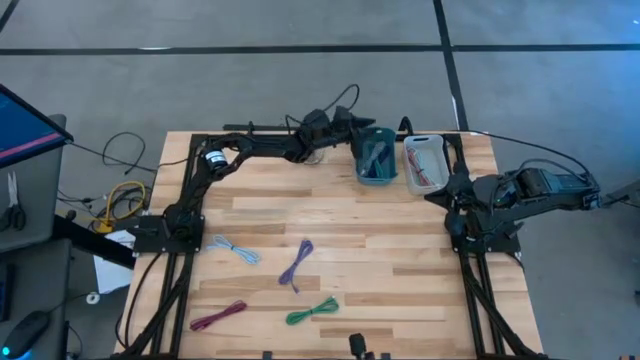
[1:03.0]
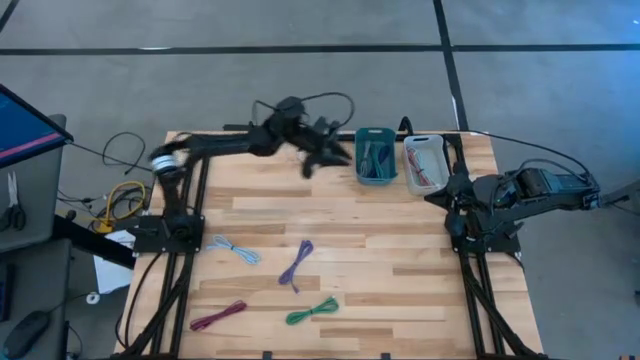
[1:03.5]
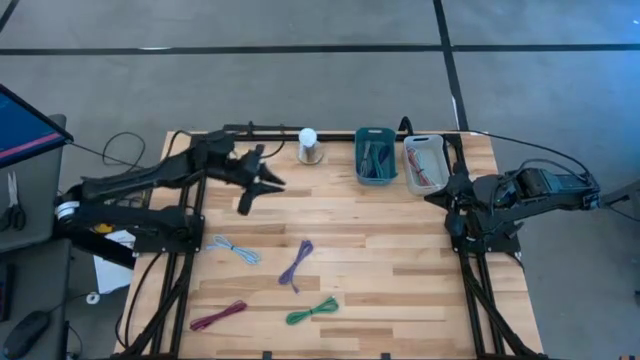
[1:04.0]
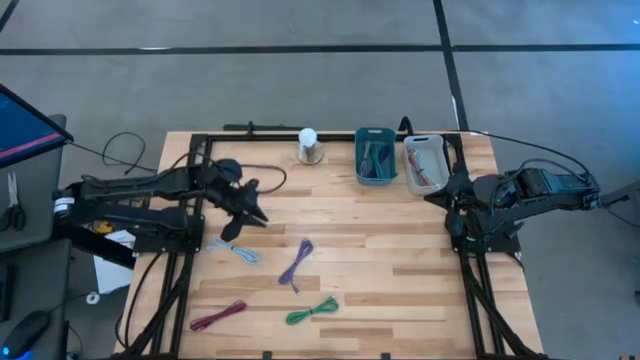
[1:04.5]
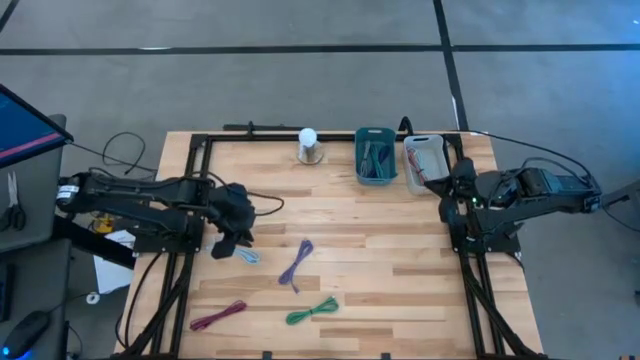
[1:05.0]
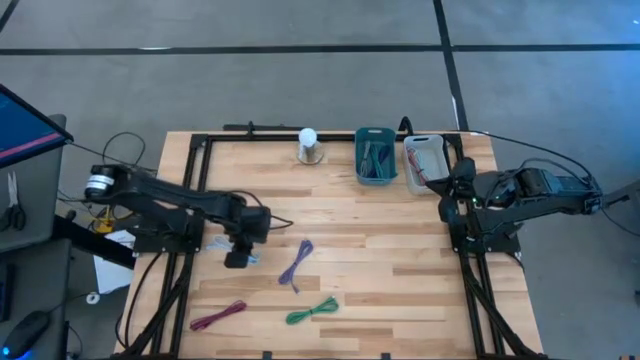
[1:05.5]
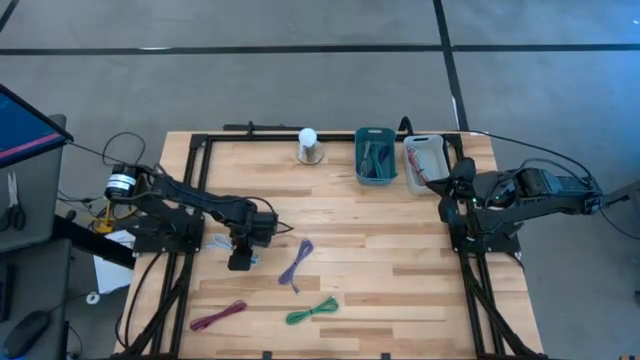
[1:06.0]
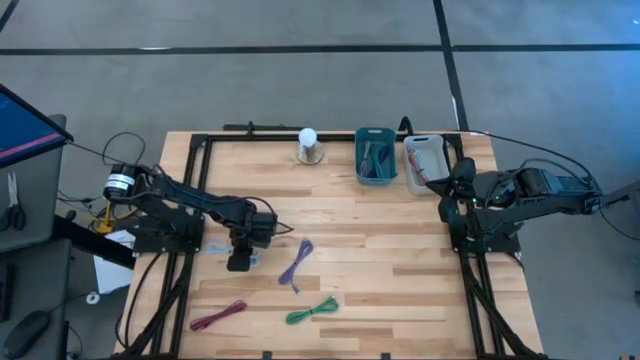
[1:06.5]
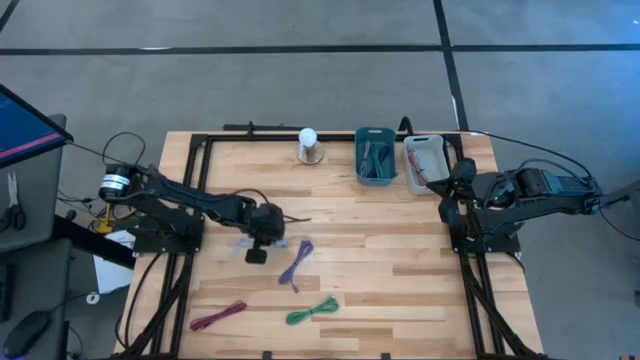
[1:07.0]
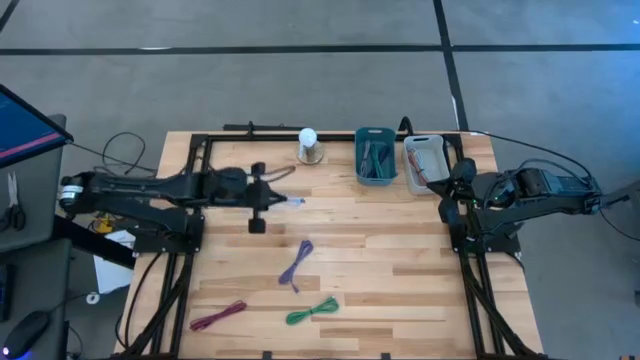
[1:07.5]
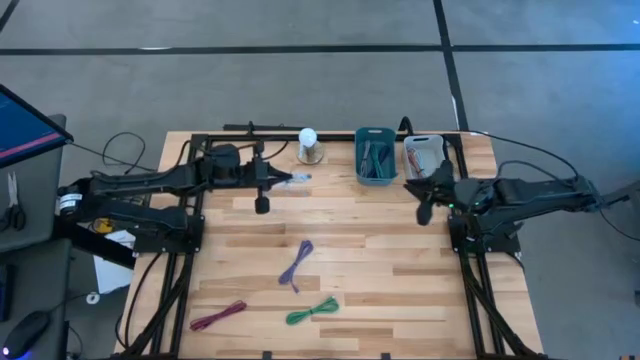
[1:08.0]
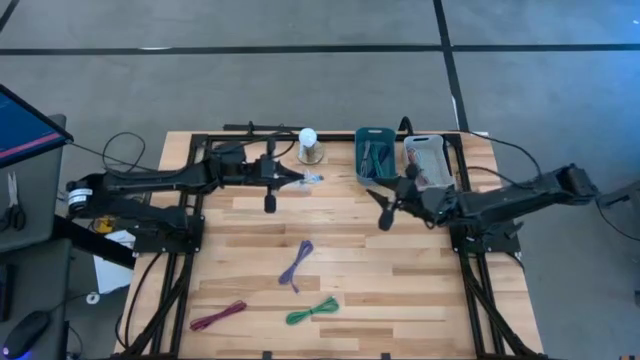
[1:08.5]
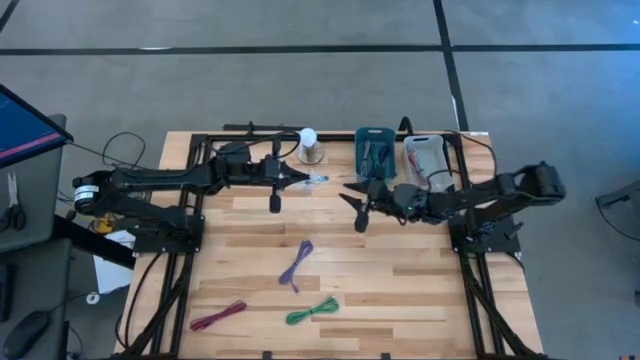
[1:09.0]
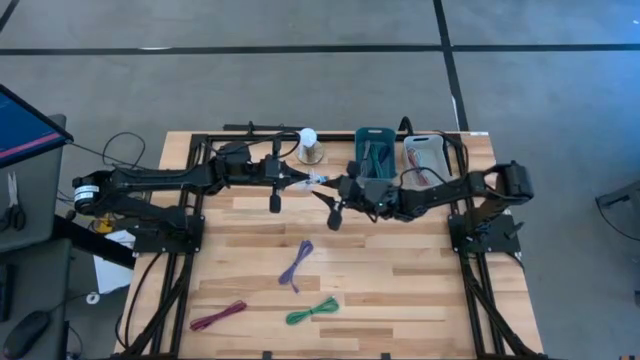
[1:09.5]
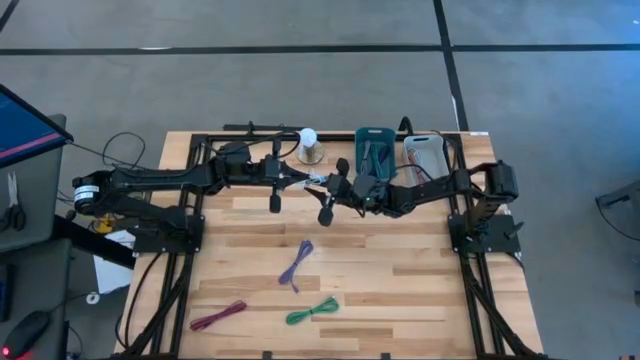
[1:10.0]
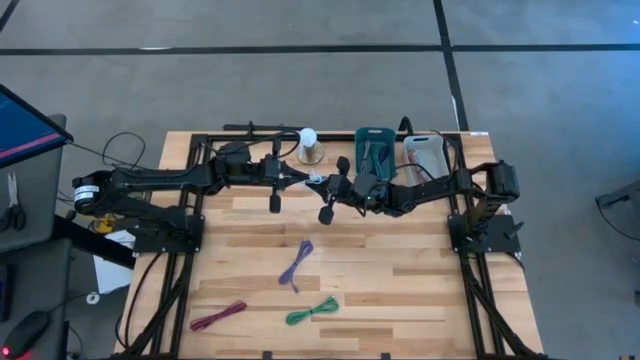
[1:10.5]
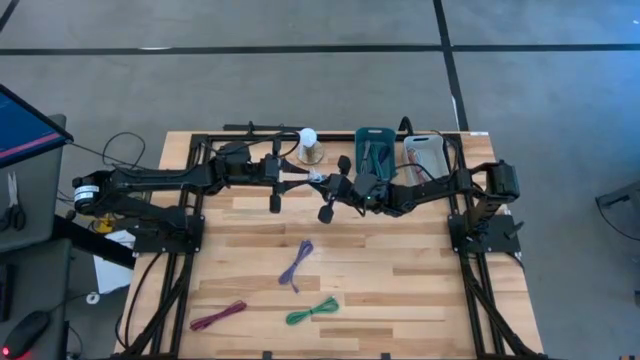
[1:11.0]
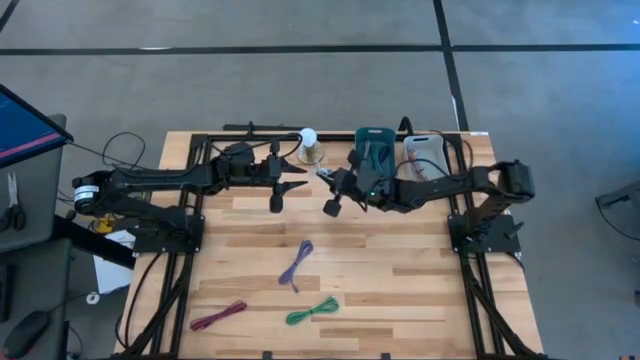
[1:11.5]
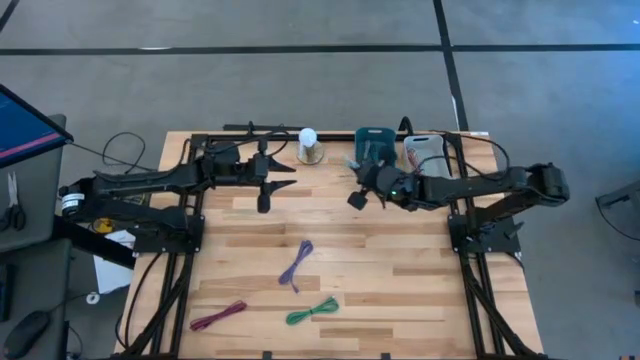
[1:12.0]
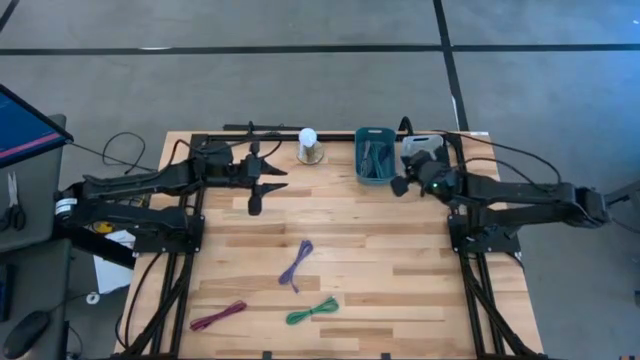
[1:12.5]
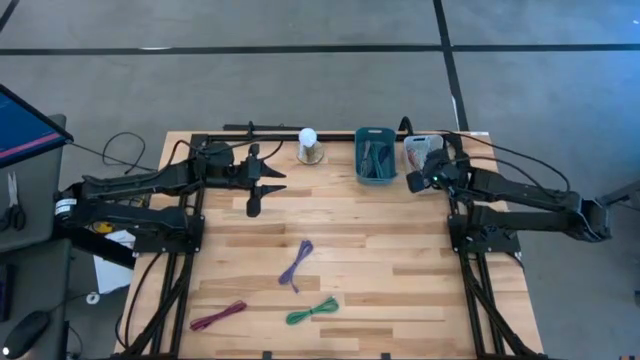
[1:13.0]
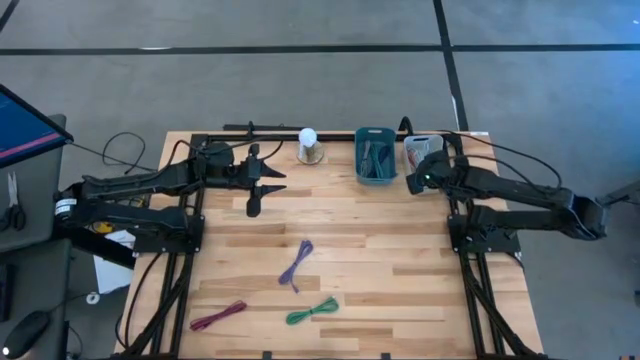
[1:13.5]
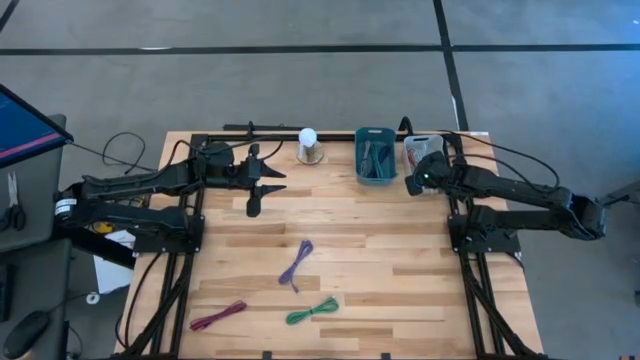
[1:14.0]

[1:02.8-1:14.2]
Task: Pick & Place USB Port
Put the blue charger cable into the gray bin

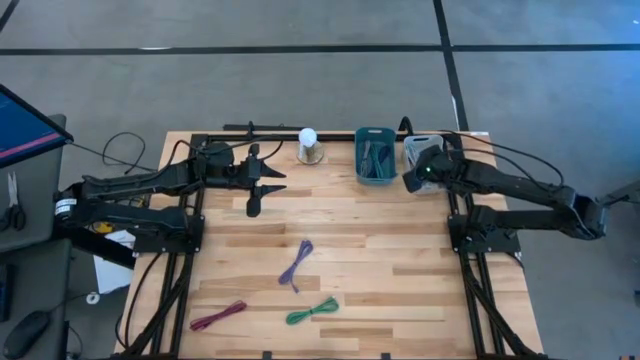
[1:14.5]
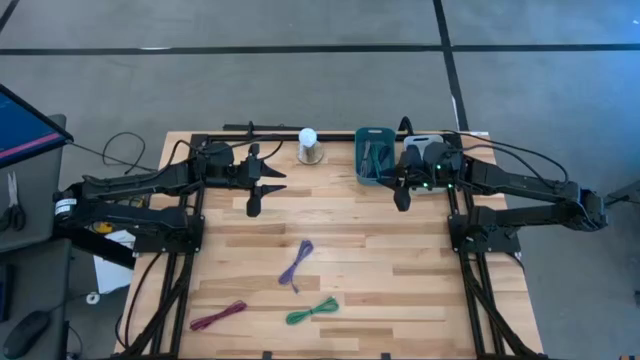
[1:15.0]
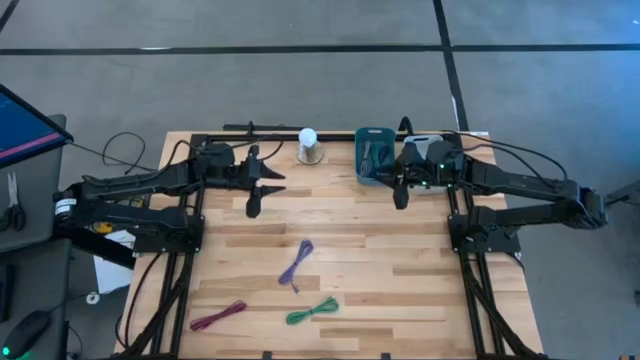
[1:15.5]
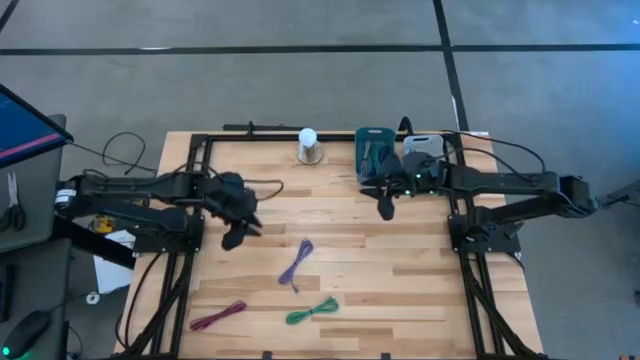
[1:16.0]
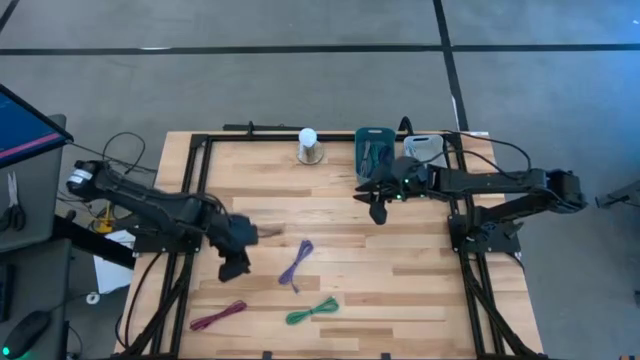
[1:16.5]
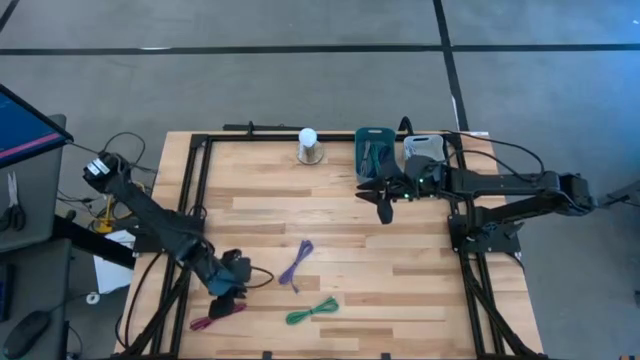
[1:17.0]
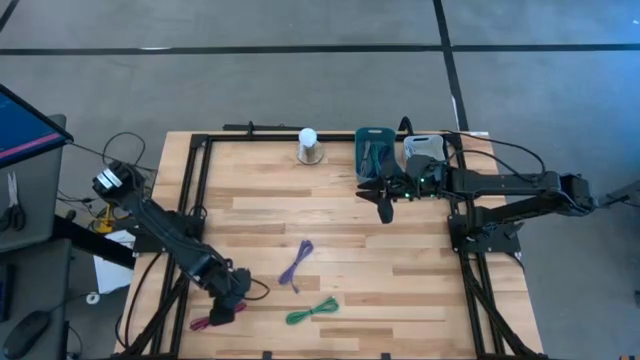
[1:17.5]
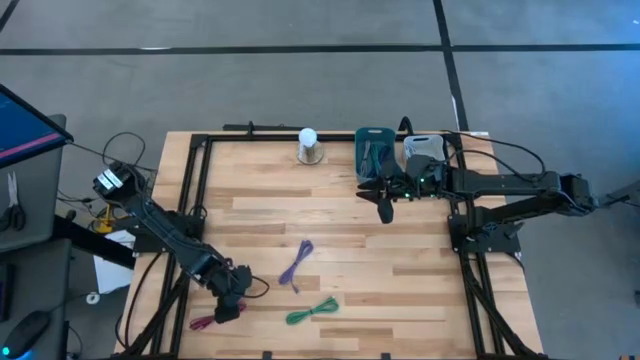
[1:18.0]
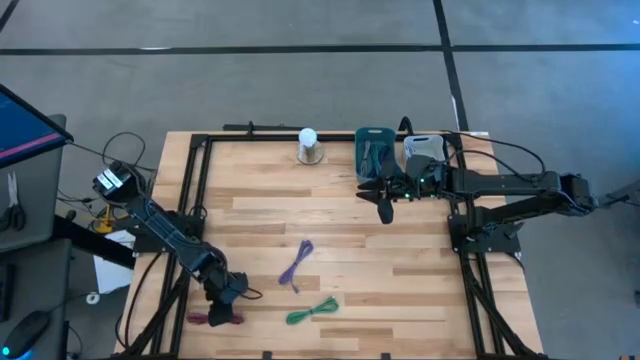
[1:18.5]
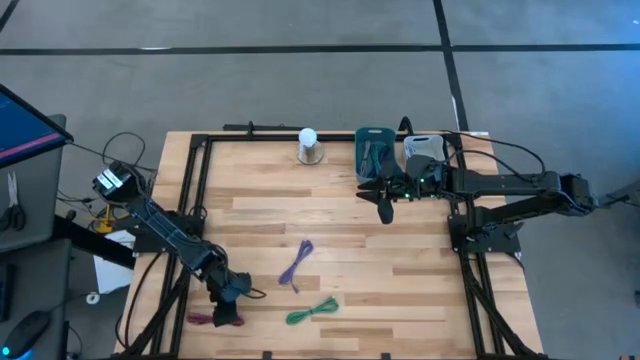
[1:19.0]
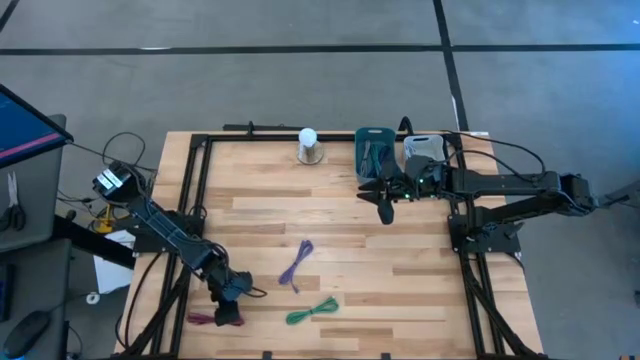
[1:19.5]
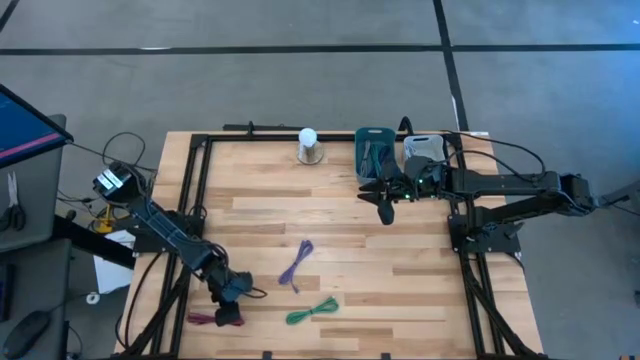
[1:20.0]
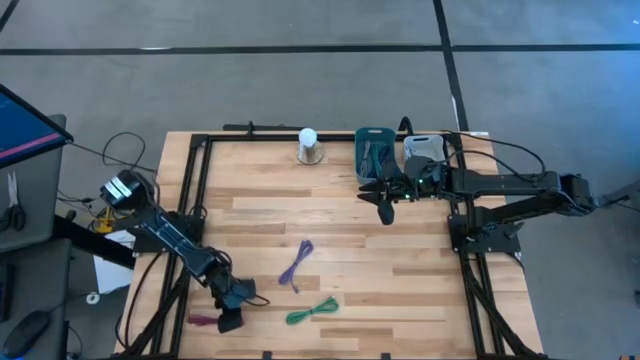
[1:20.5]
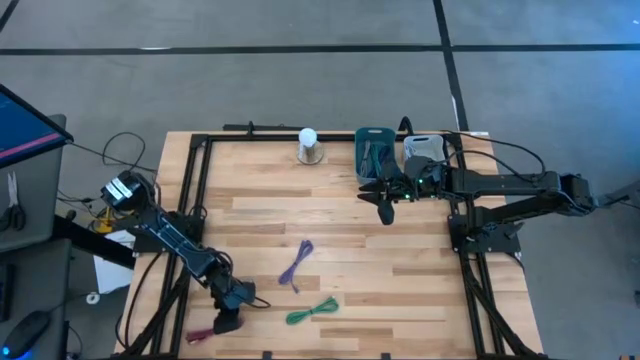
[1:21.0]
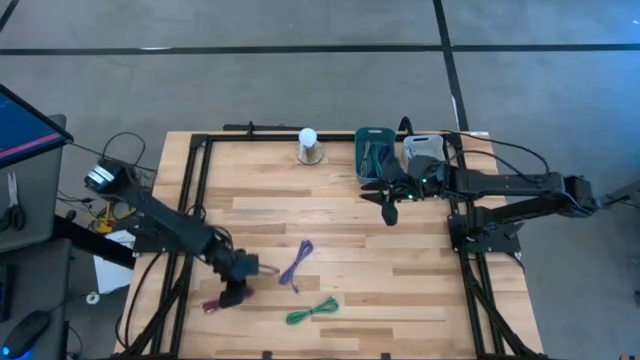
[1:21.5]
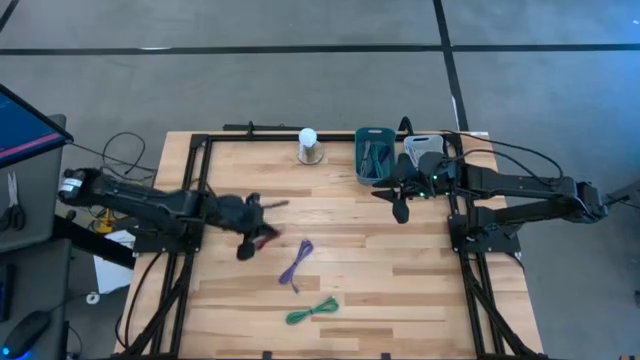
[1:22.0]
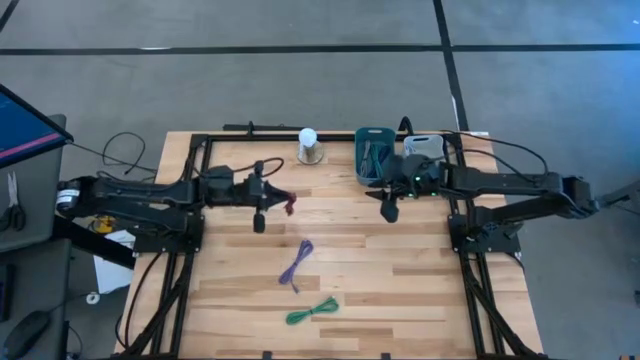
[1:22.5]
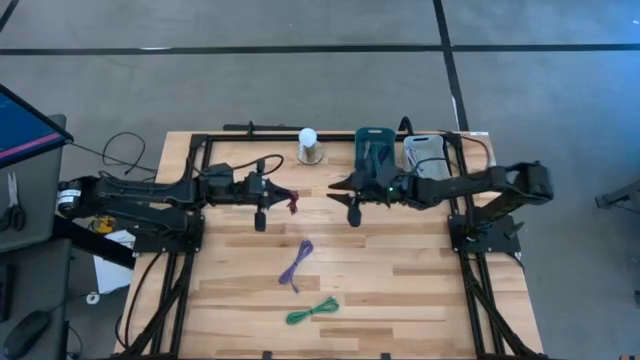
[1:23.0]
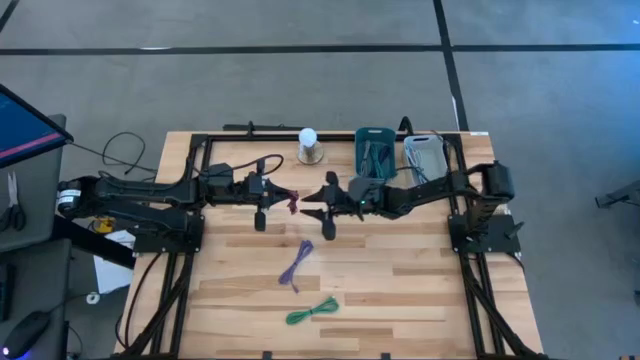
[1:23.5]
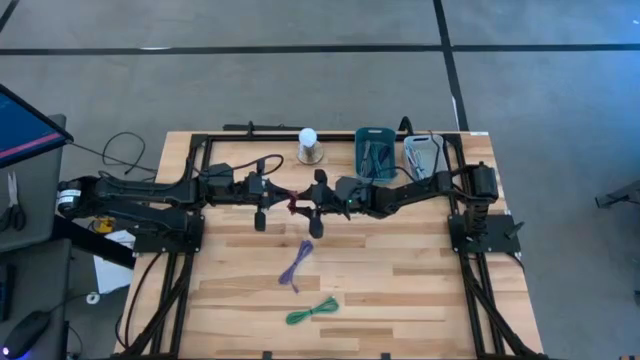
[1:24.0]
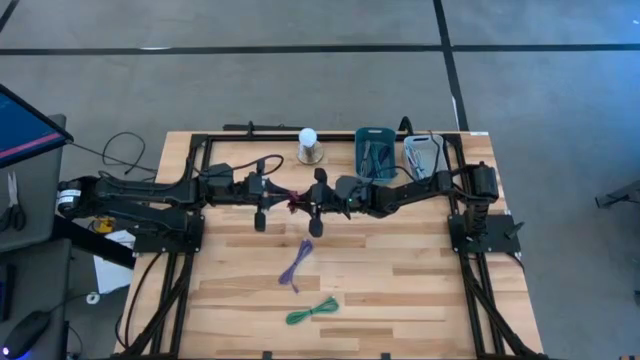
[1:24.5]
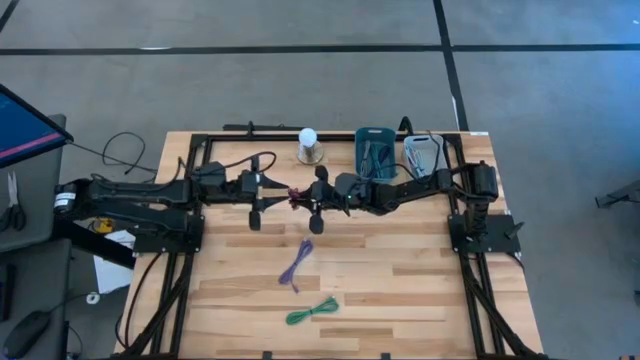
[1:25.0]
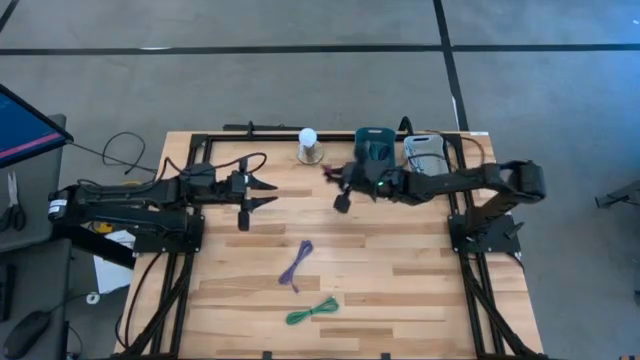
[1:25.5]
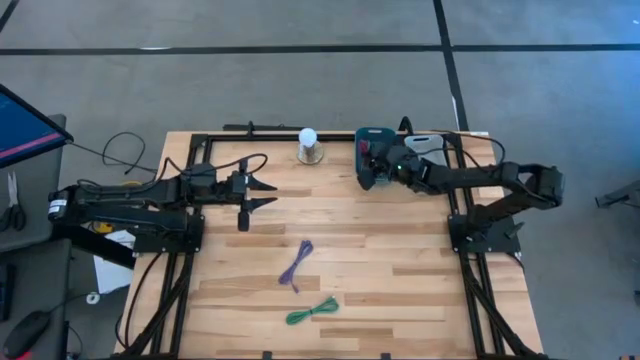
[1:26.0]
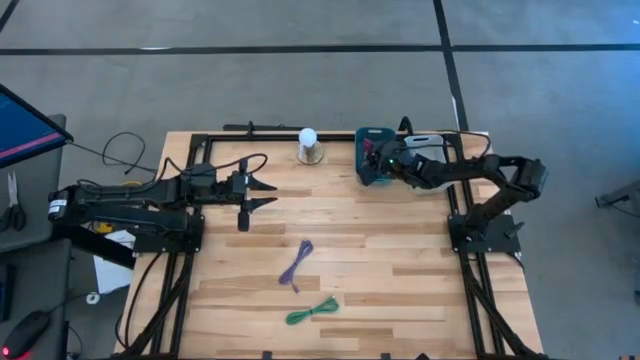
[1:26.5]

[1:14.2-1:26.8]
Put the braided red charger cable into the blue bin
